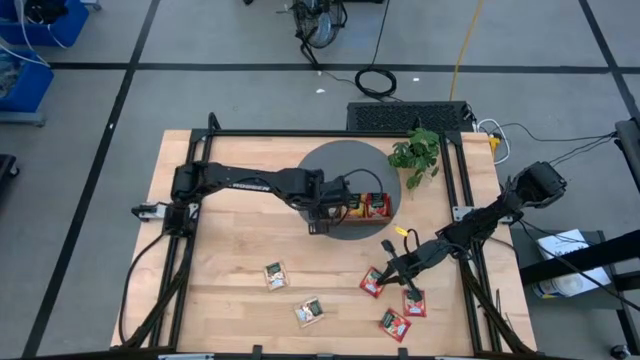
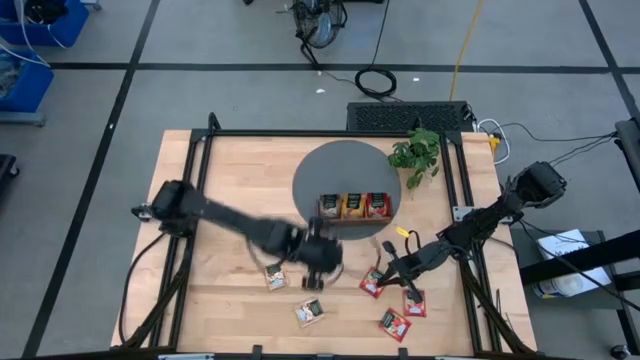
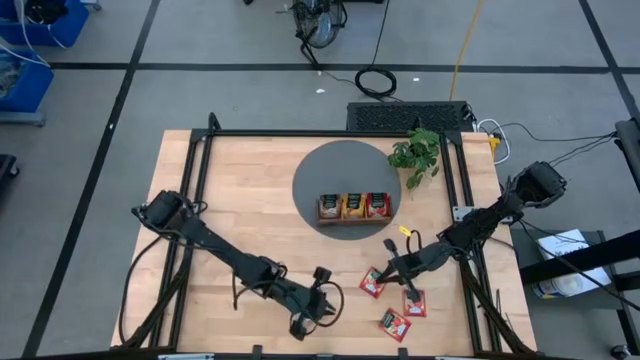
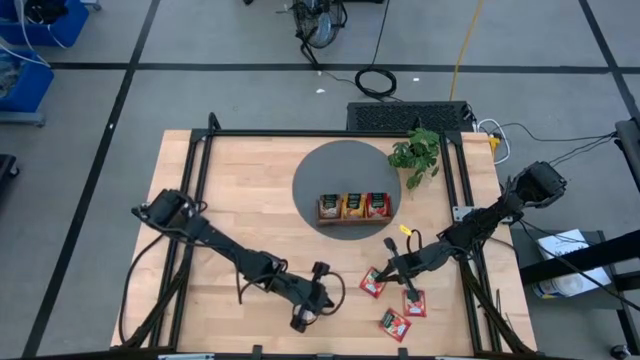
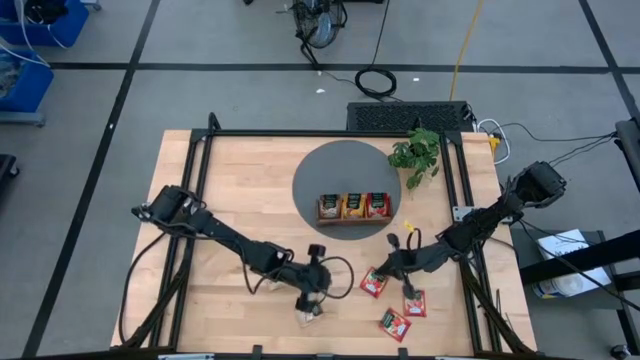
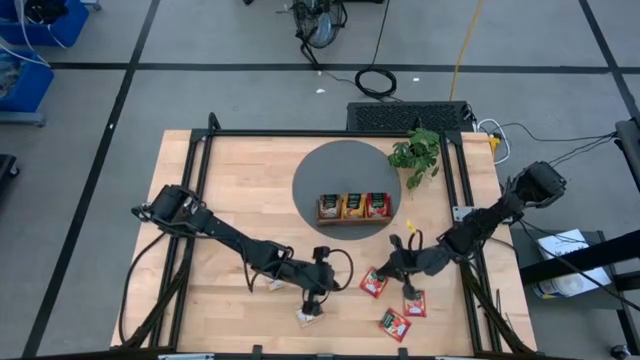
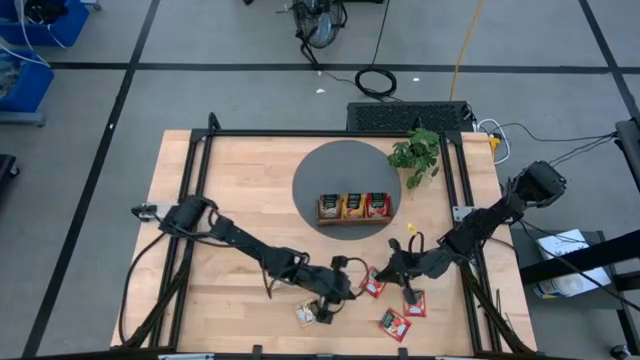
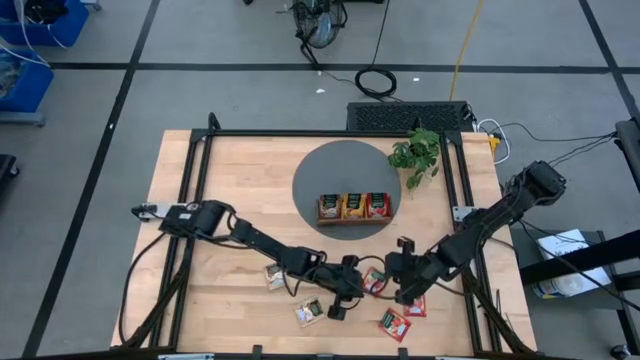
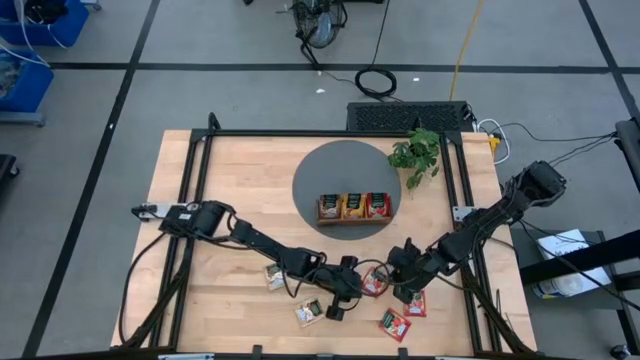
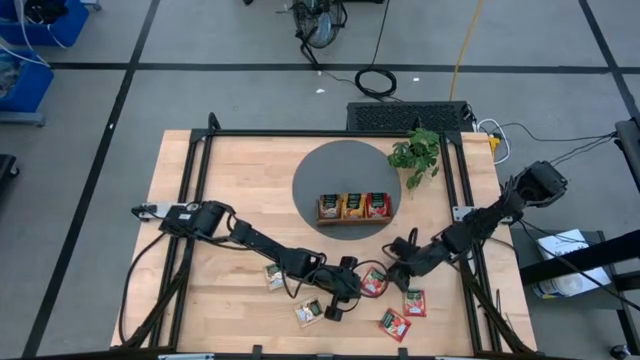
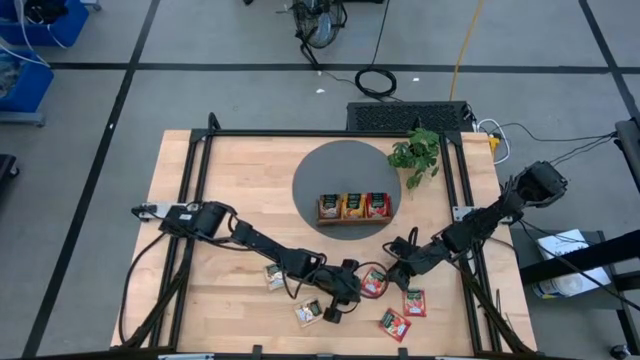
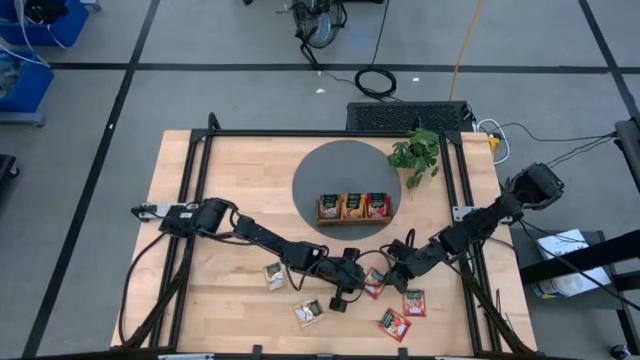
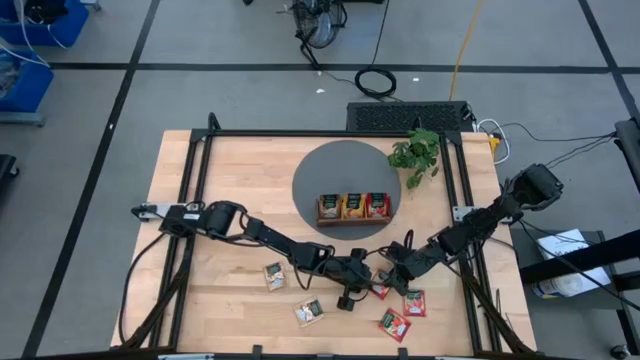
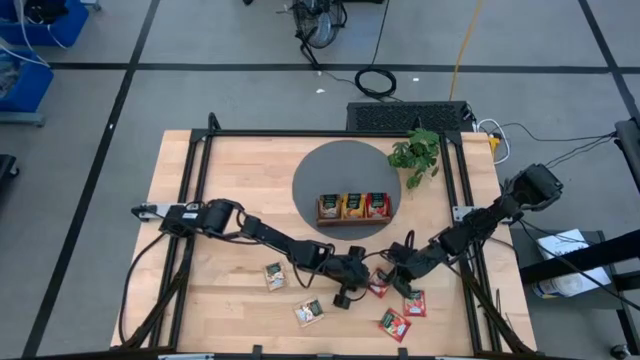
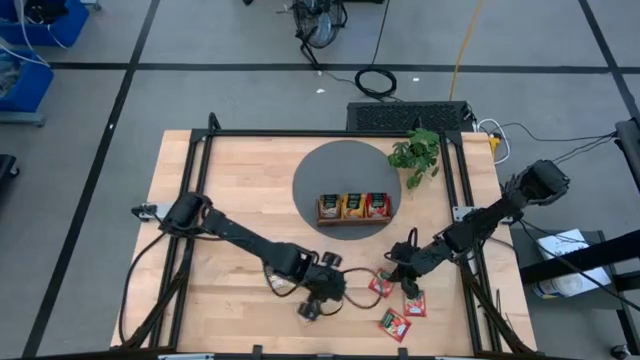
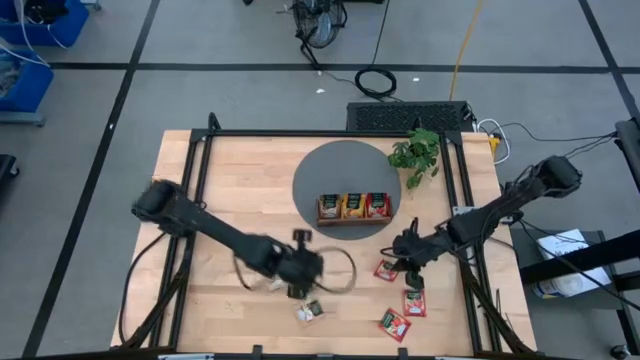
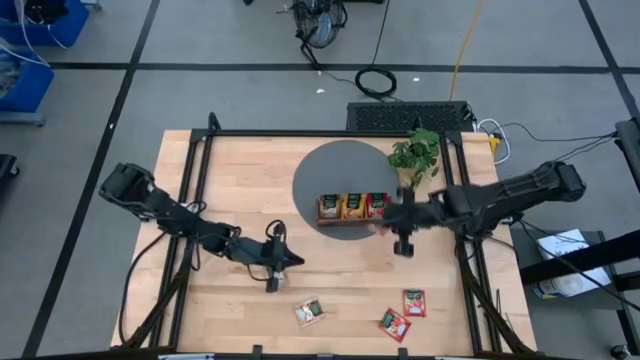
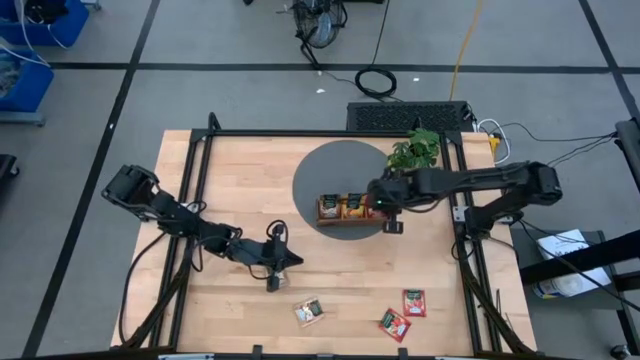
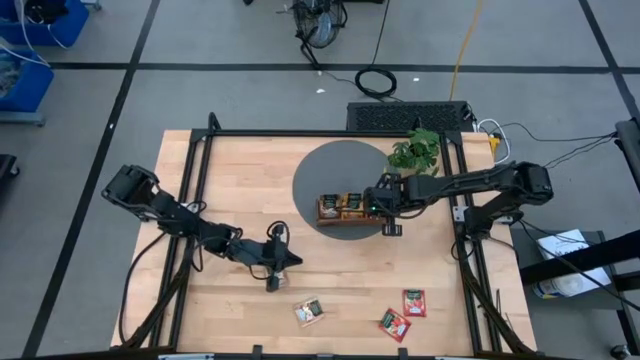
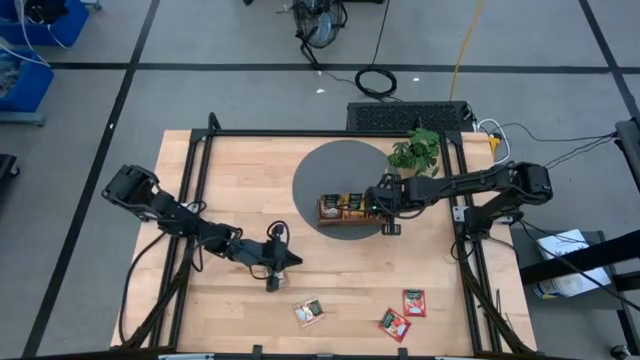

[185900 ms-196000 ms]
Task: Pick & Place Tea
Put the red tea bag into the right section of the wooden organizer

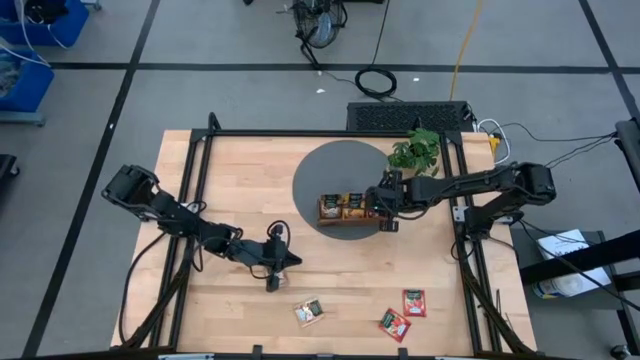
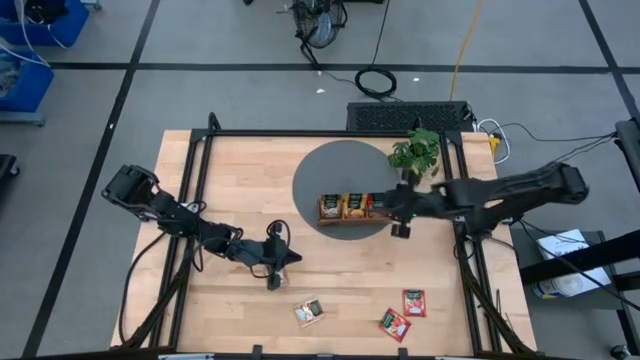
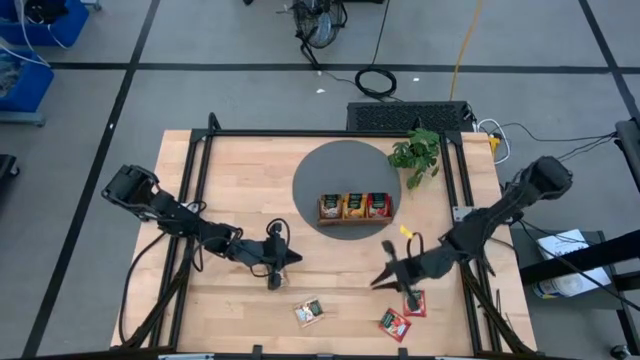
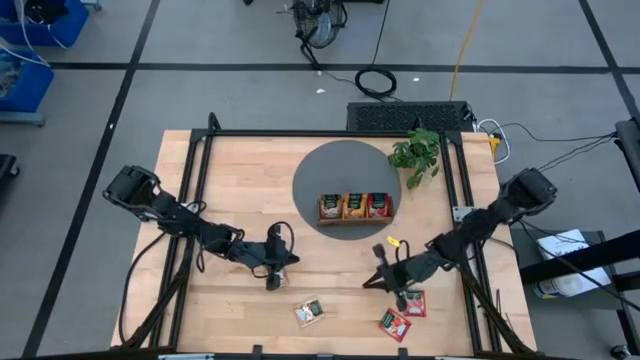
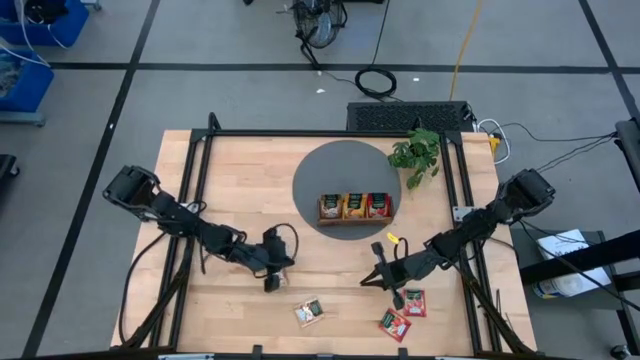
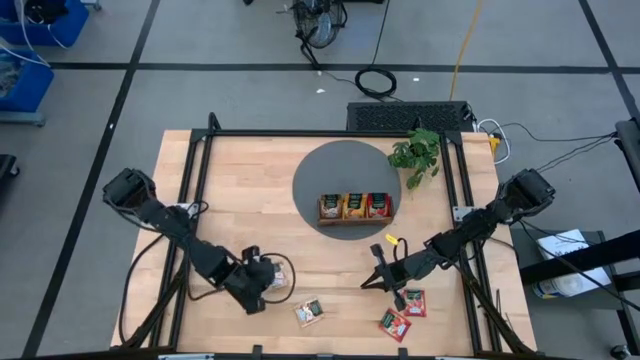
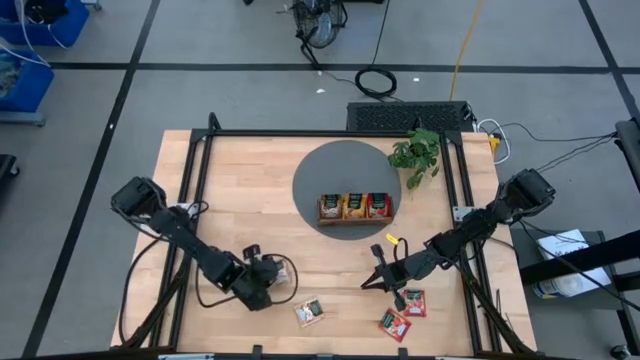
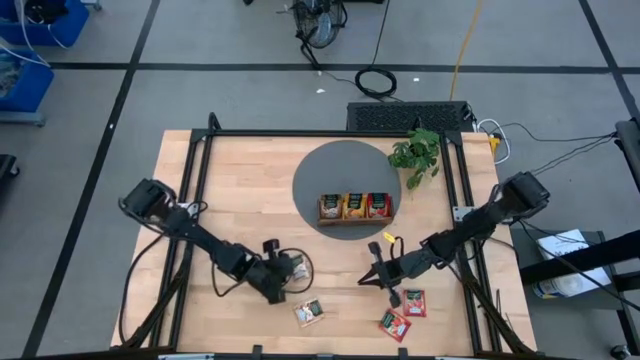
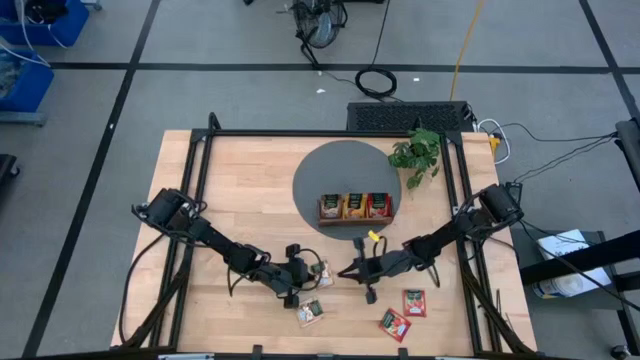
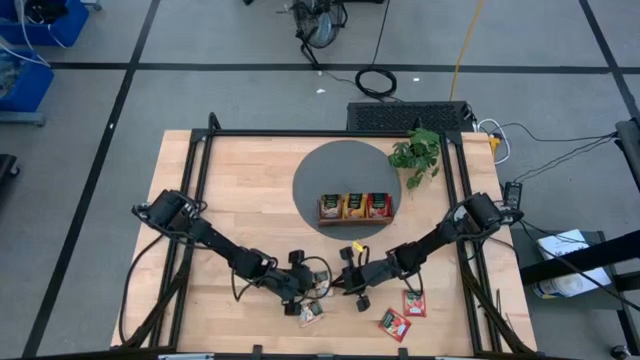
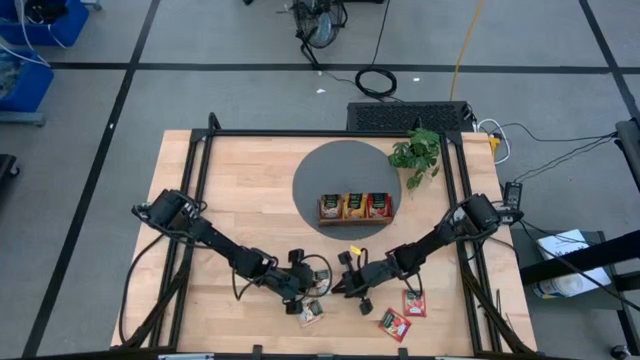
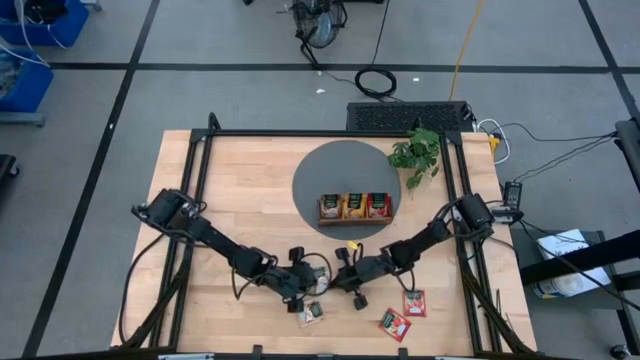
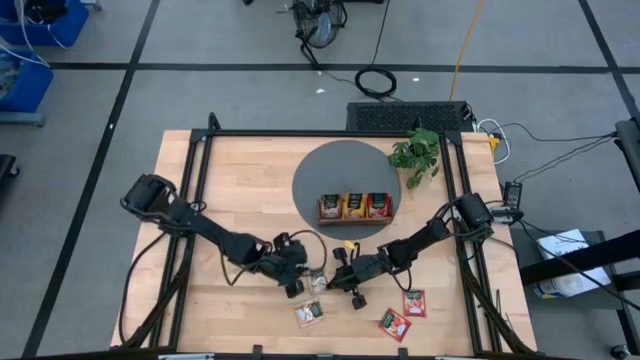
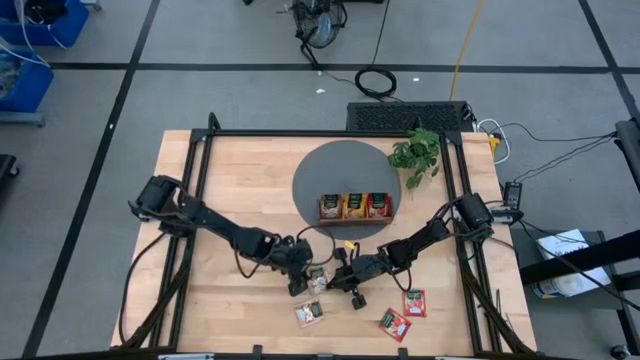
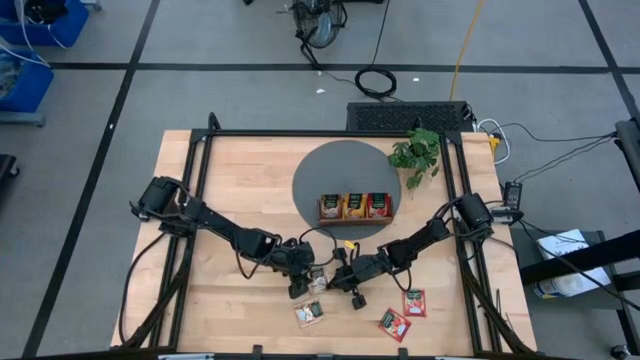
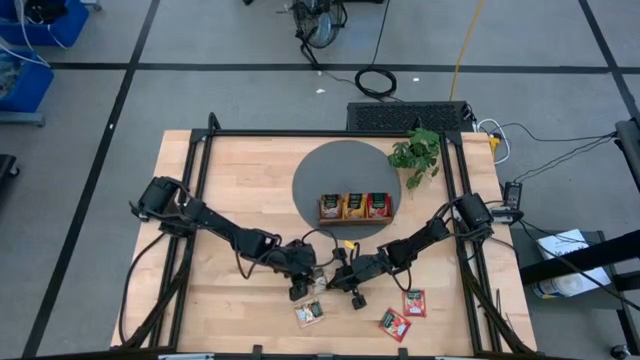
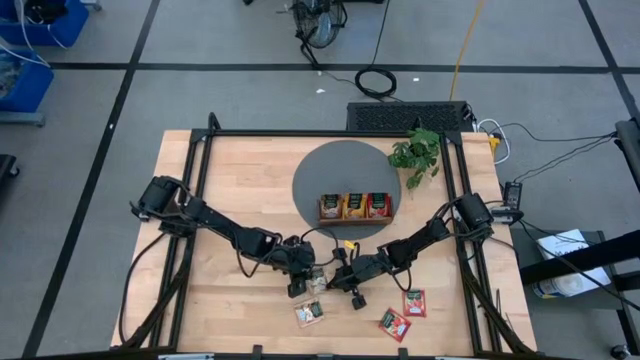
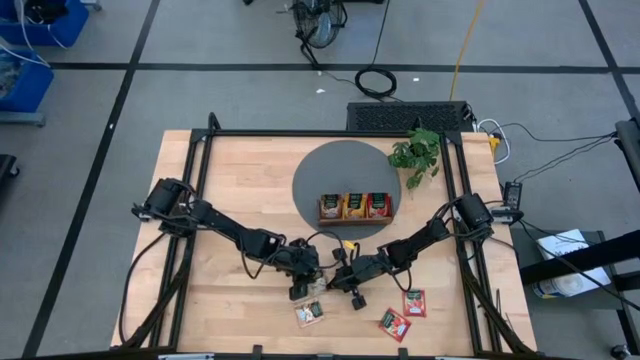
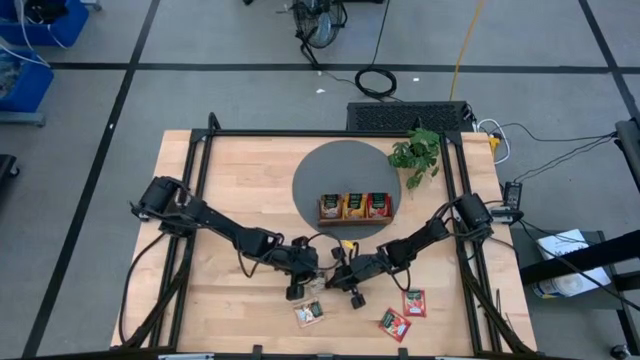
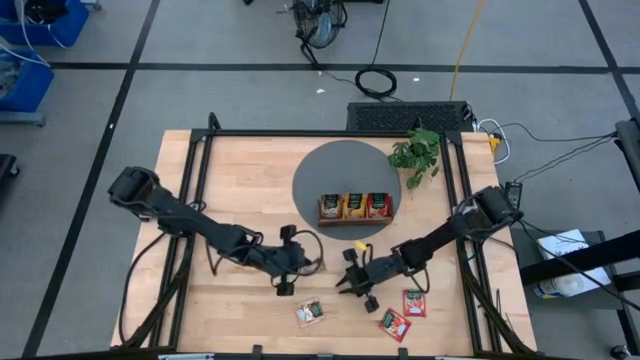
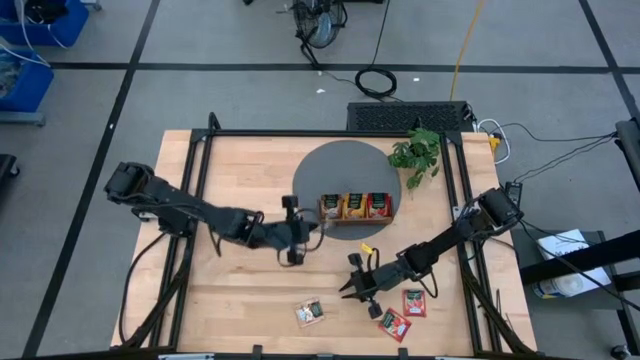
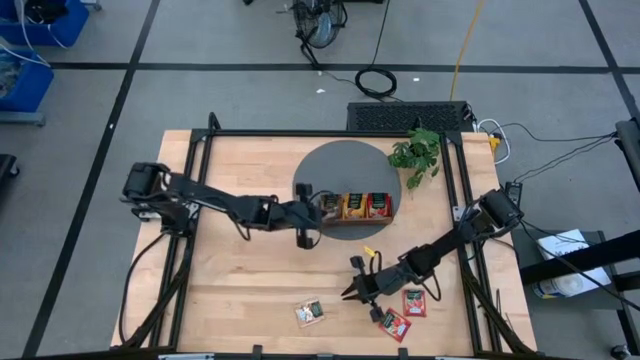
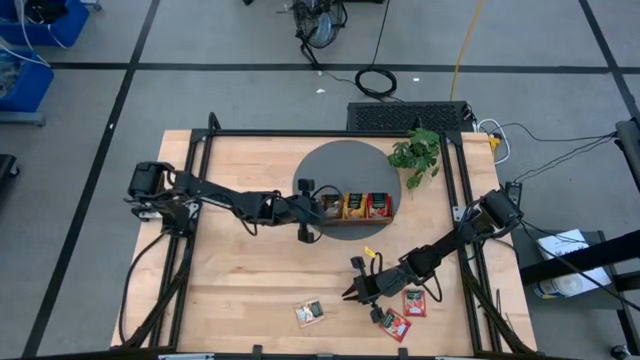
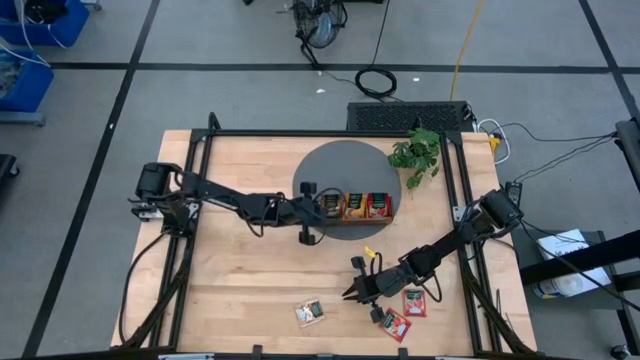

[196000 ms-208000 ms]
Put the brown tea bag into the left section of the wooden organizer
